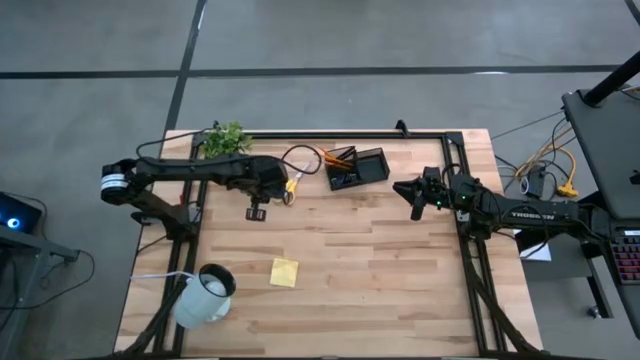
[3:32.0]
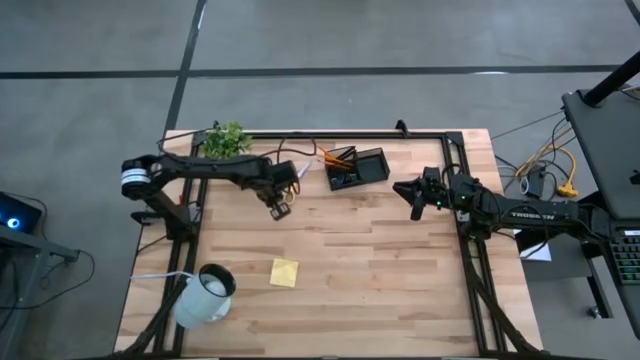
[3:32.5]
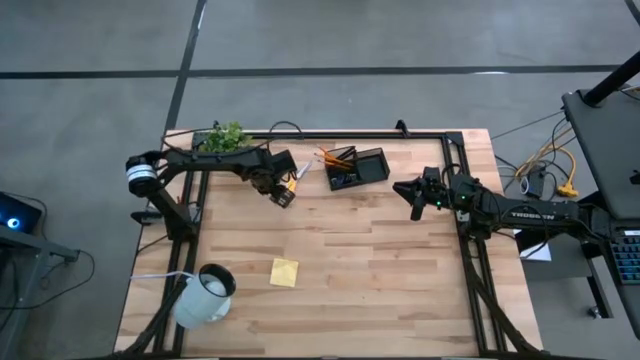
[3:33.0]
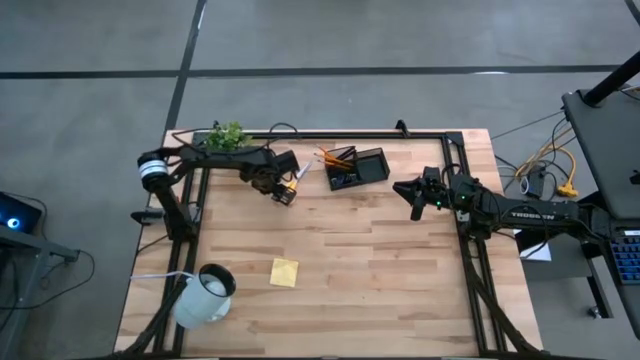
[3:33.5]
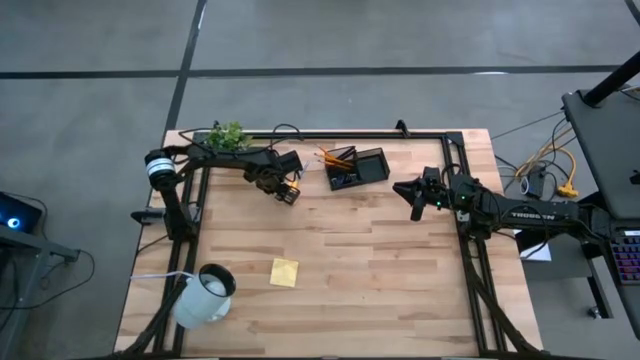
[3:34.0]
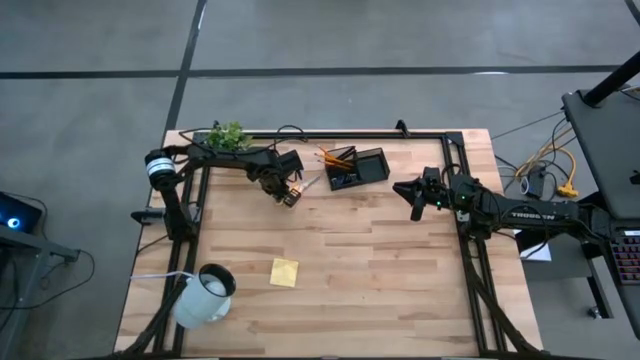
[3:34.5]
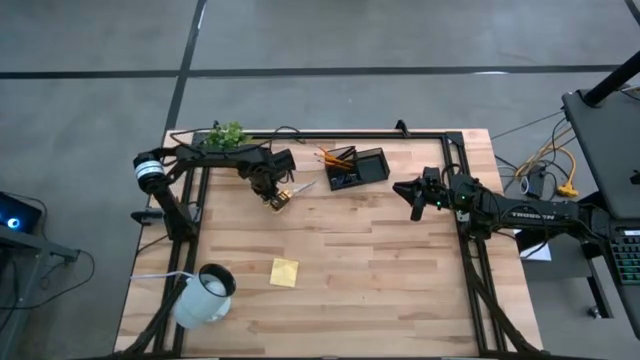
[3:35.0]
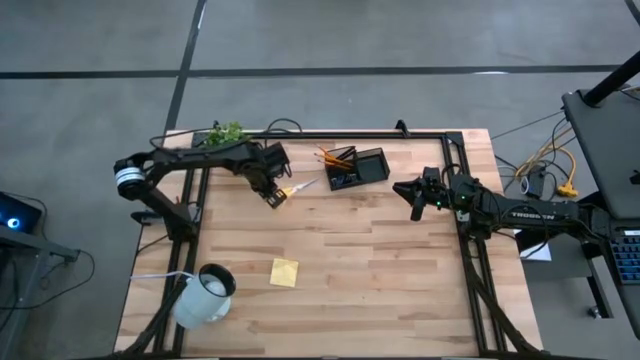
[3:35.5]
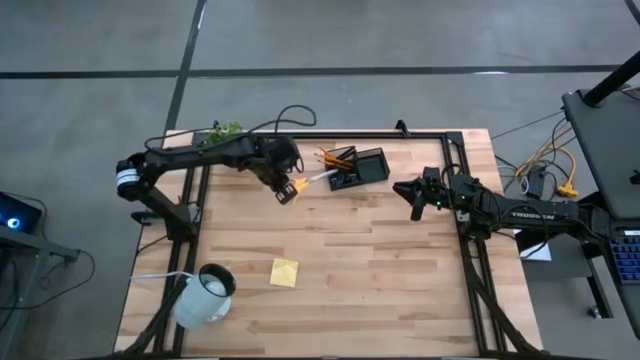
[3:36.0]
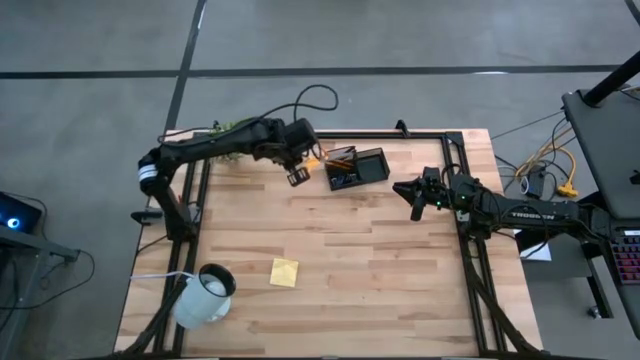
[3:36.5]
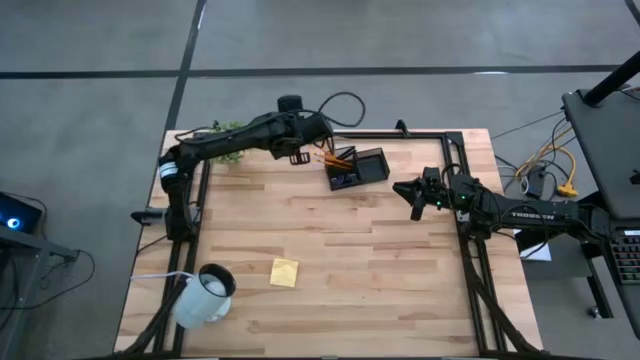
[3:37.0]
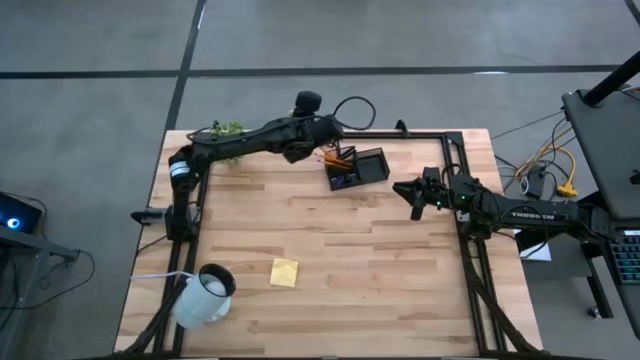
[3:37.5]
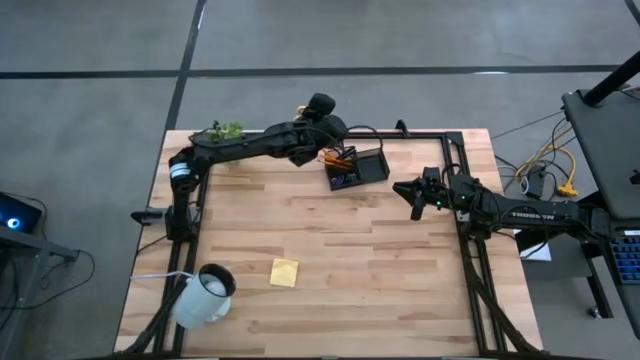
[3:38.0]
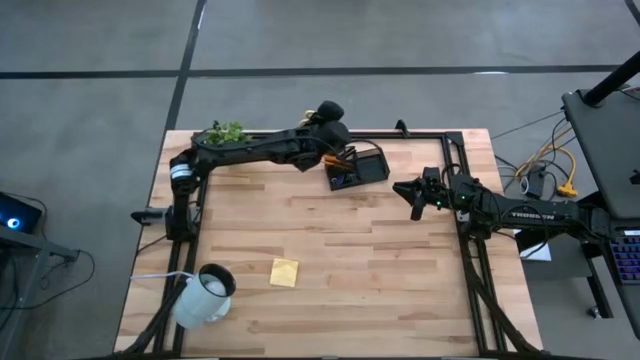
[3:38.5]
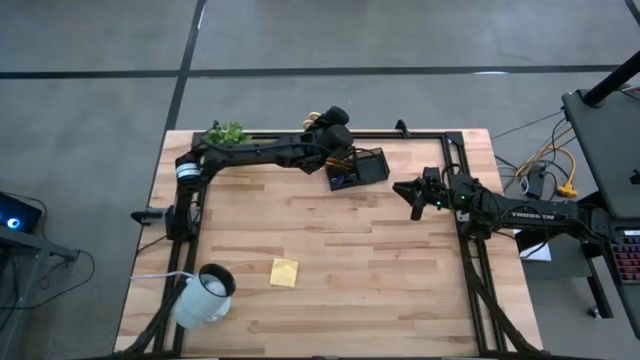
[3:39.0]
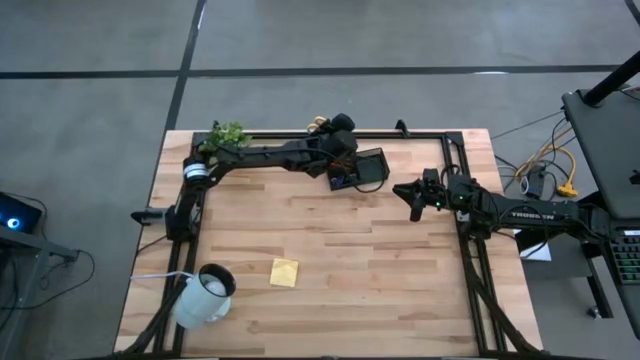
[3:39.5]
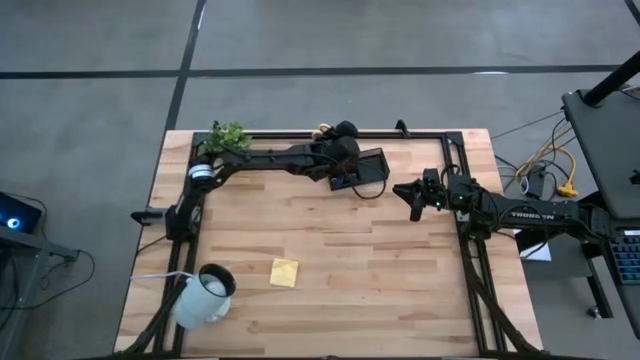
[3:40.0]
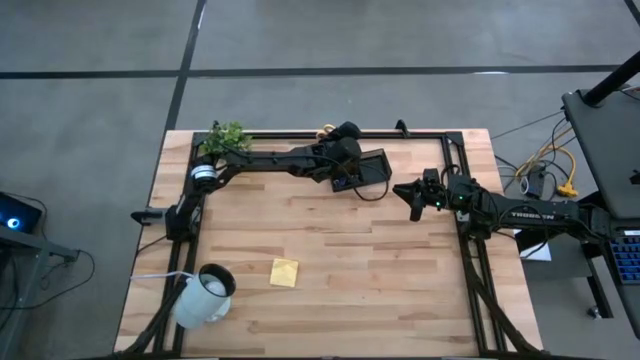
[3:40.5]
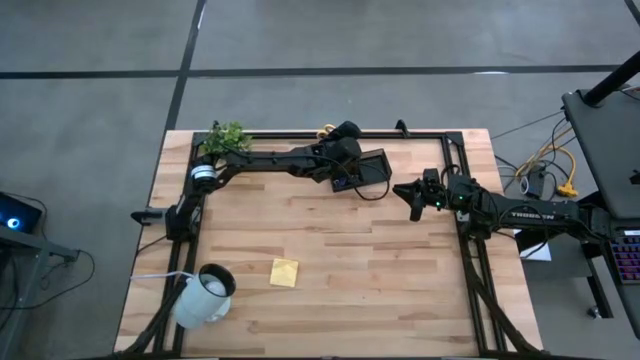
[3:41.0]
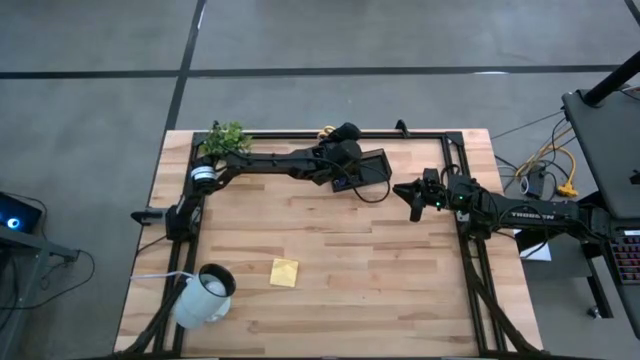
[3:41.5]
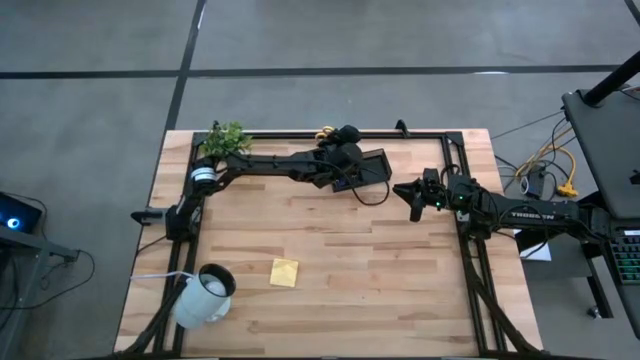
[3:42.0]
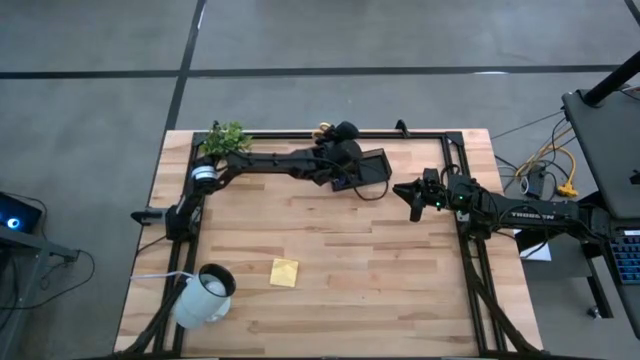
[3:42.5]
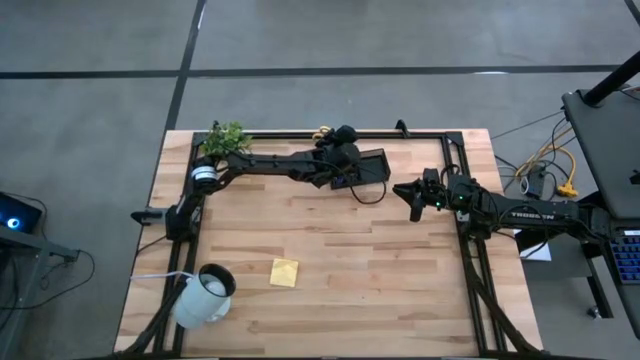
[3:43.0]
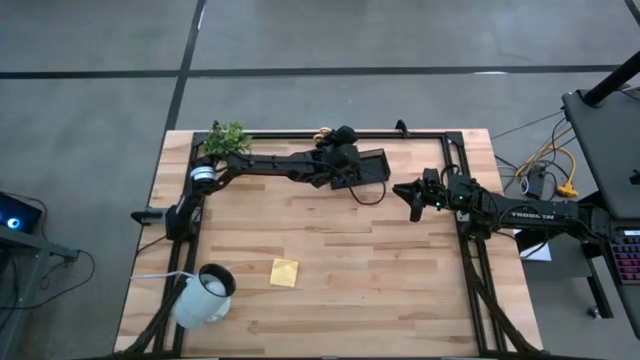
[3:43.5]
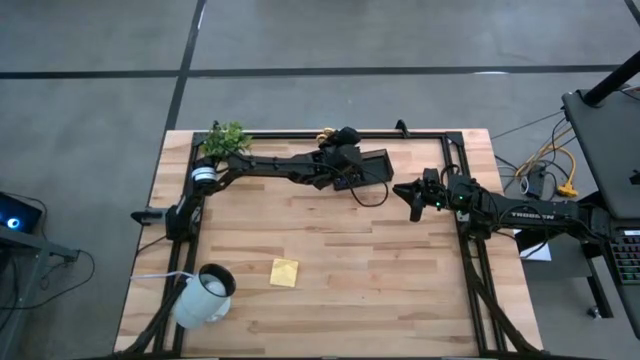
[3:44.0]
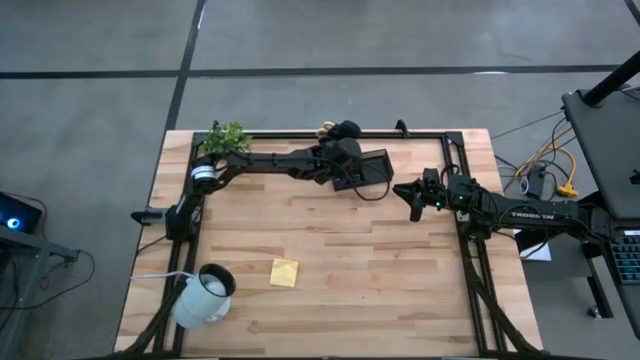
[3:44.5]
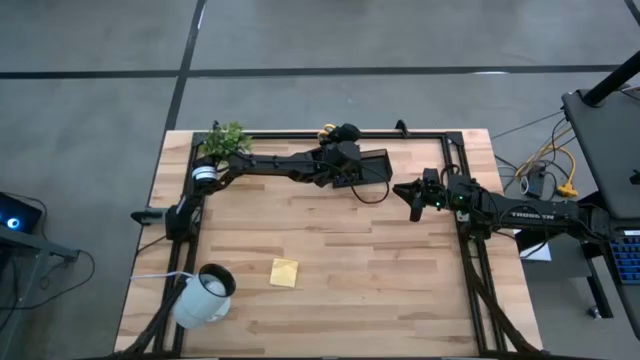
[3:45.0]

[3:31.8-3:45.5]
Task: Pick and place office supplies into organizer
Put the scissors into the desk organizer

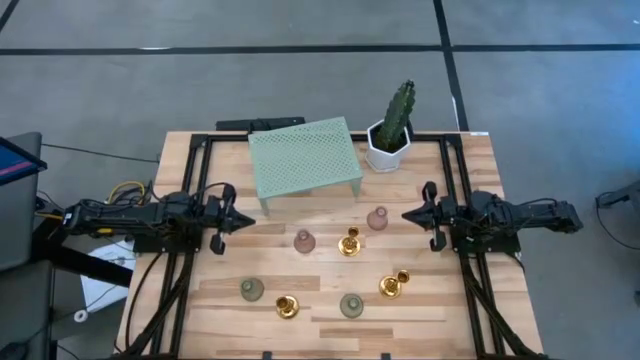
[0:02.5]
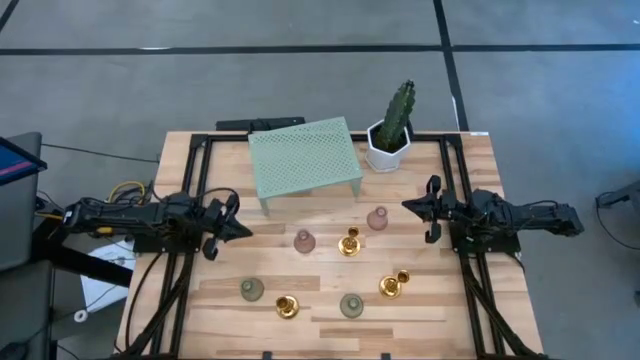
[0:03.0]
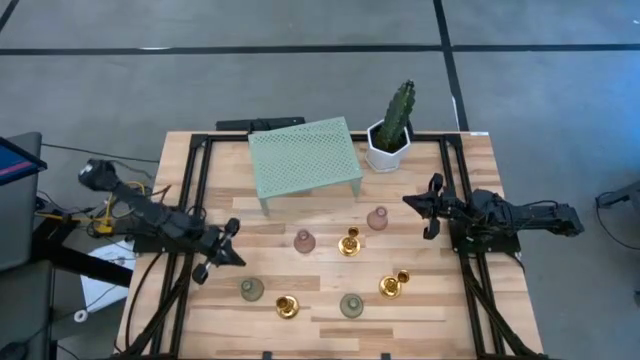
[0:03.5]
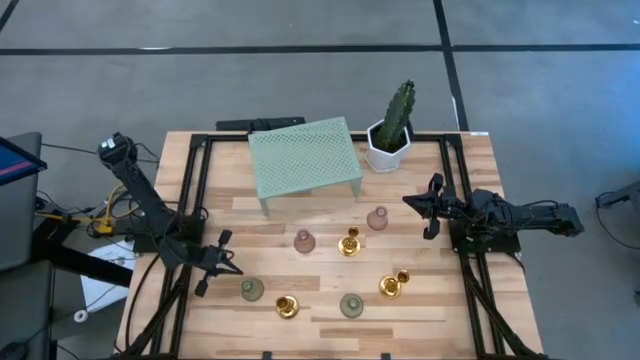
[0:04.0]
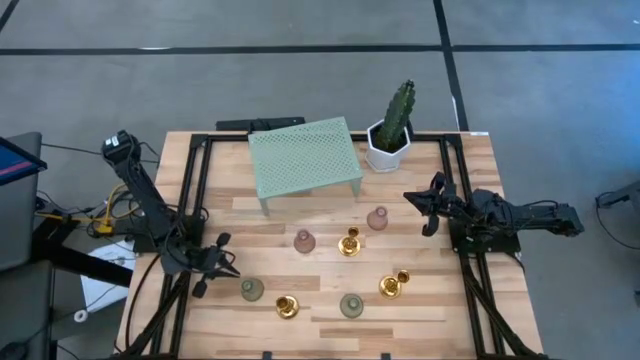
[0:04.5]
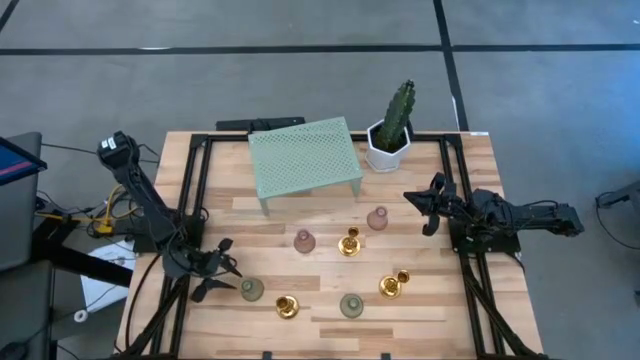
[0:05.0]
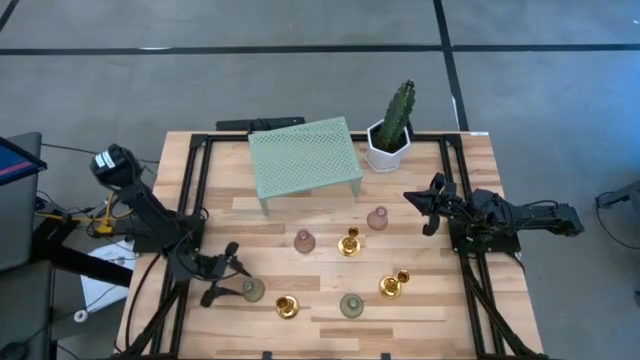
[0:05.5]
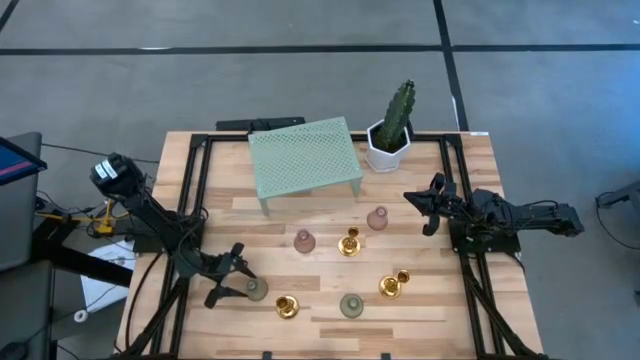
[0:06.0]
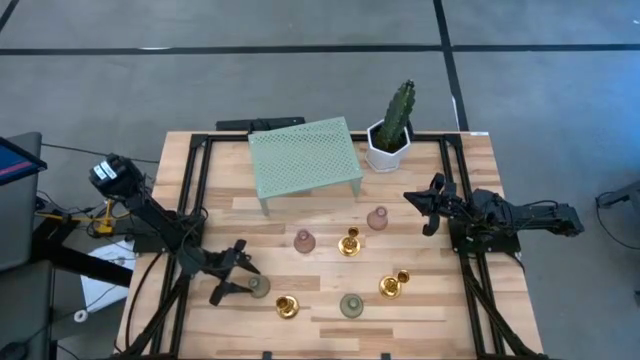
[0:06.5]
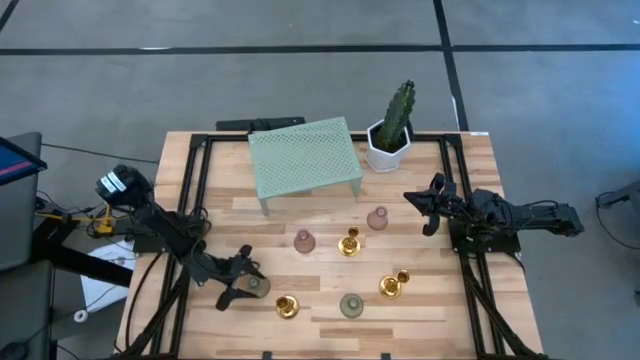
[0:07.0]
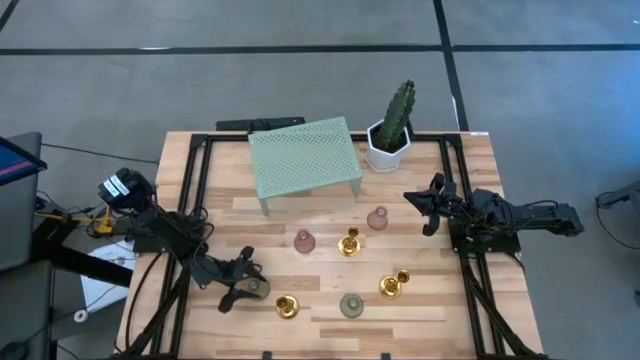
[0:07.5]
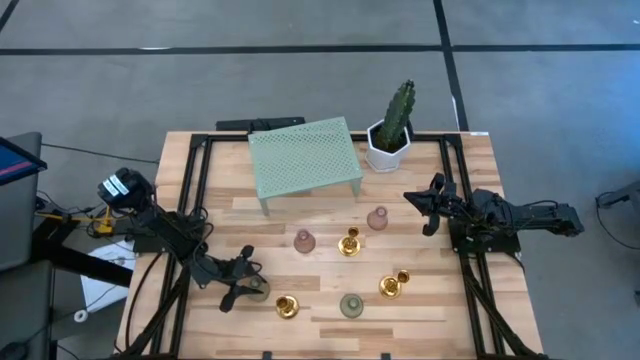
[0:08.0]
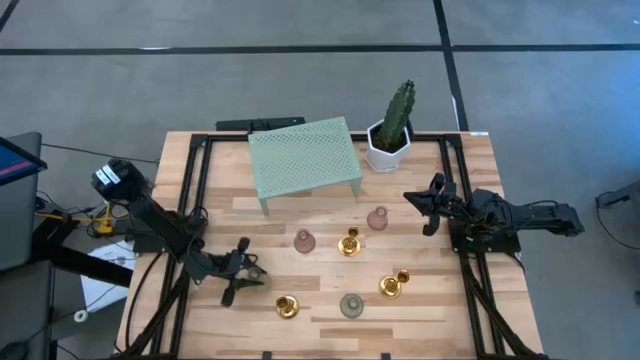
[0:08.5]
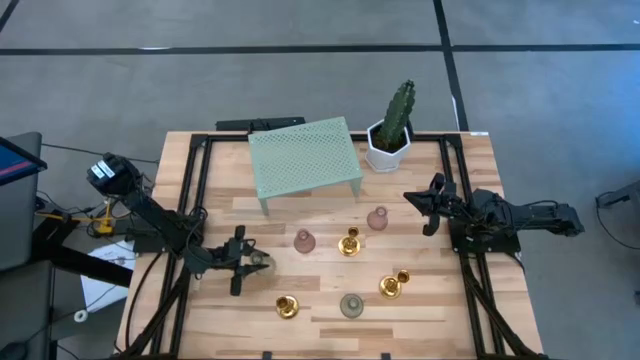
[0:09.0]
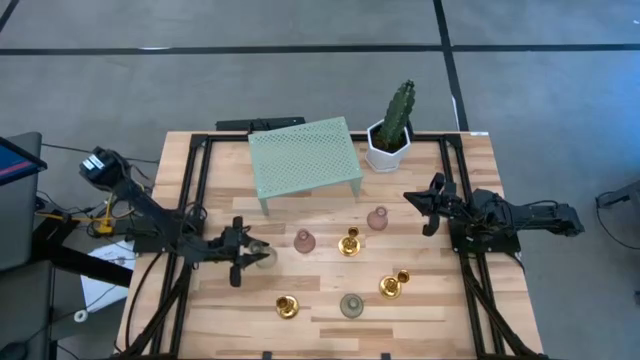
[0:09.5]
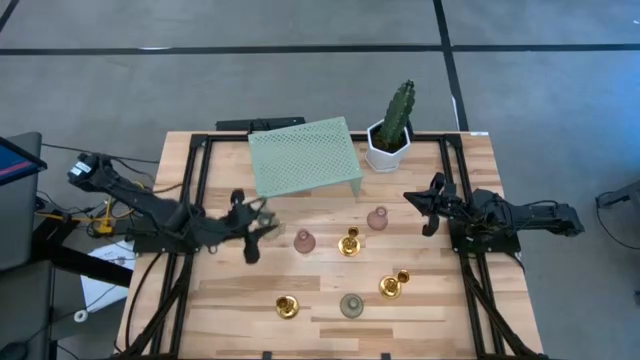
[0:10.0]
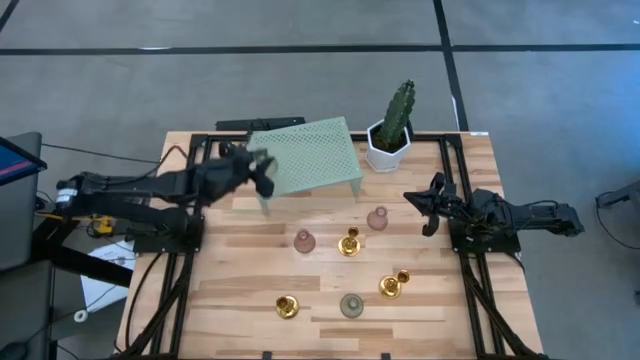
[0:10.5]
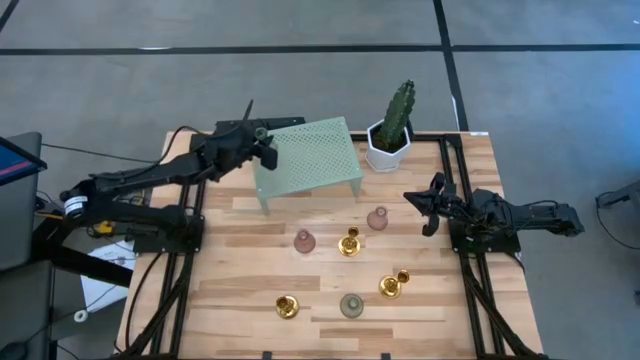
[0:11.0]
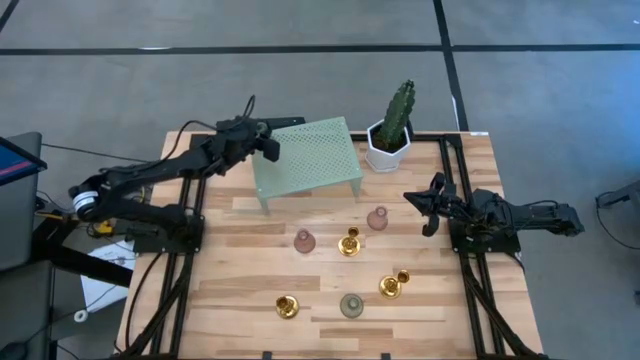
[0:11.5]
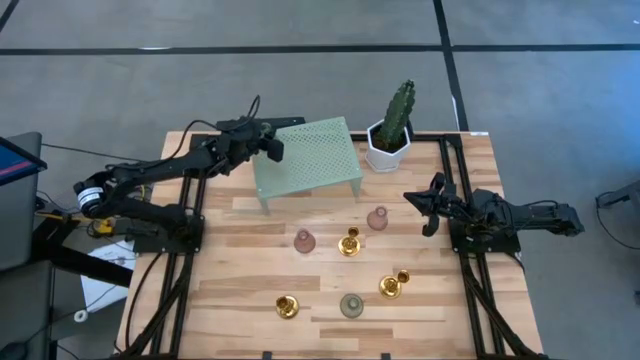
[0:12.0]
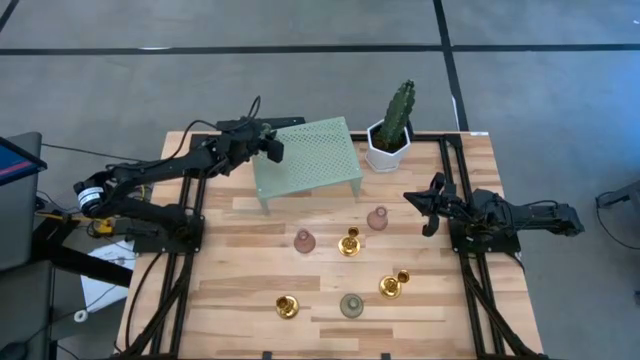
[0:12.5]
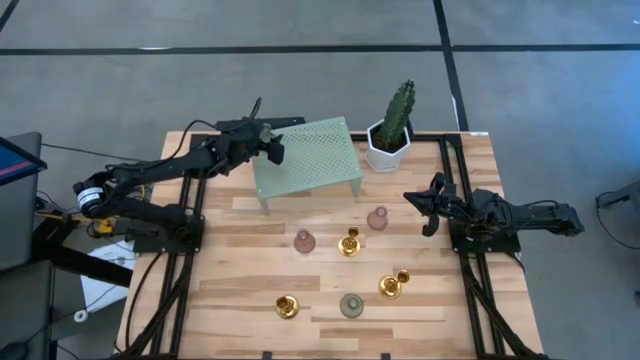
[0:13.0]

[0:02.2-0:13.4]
Task: Pick & Place candle stick holders
Put the left green glass candle holder on the shelf
